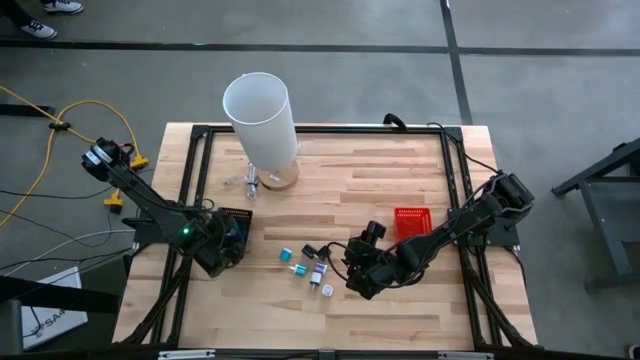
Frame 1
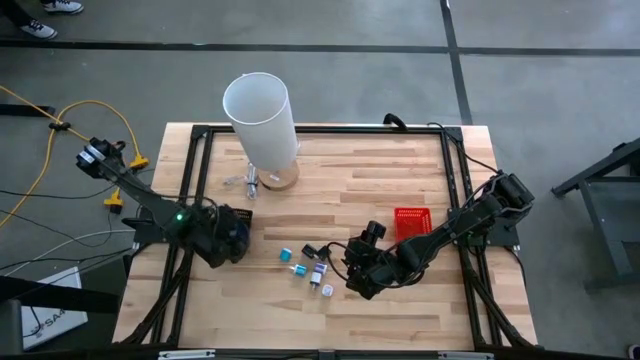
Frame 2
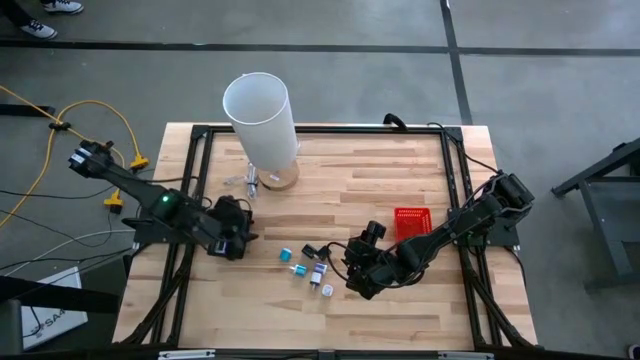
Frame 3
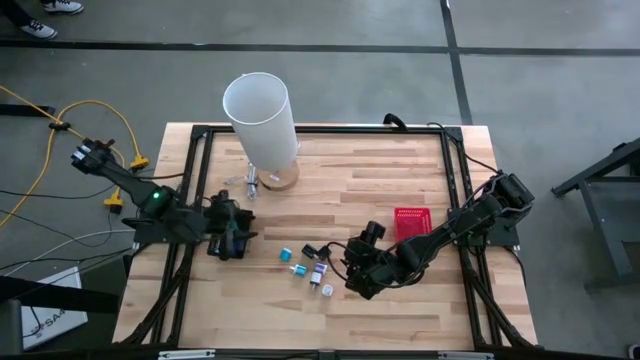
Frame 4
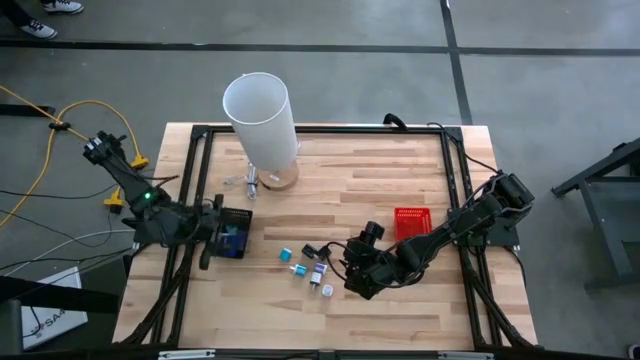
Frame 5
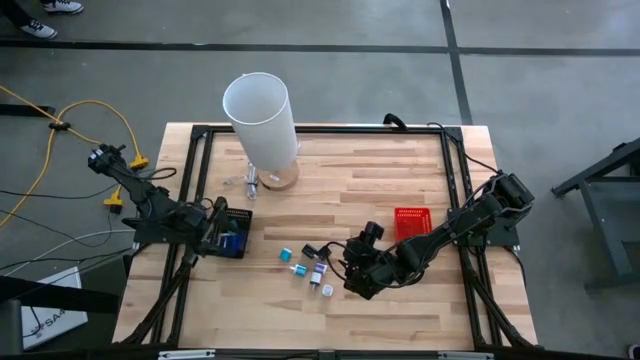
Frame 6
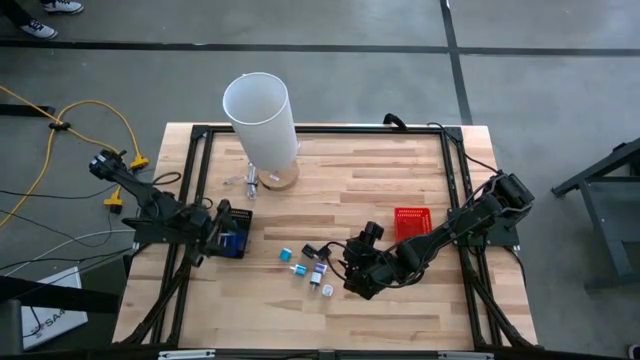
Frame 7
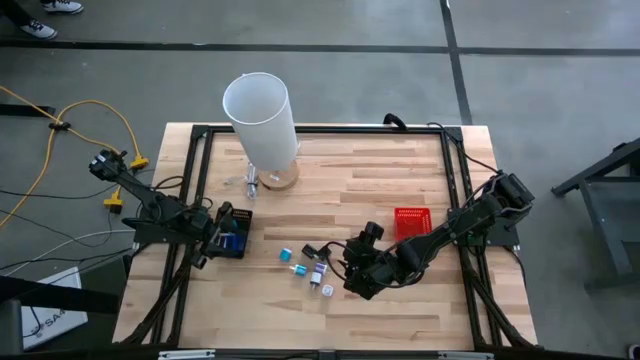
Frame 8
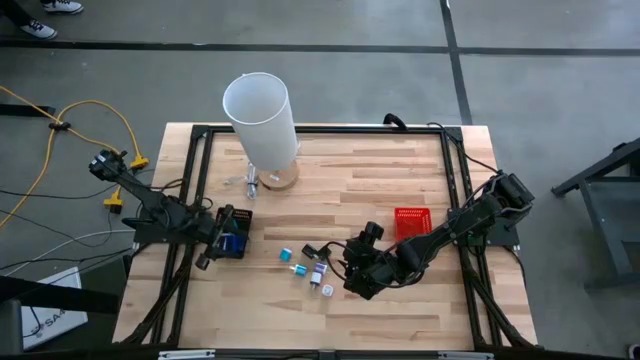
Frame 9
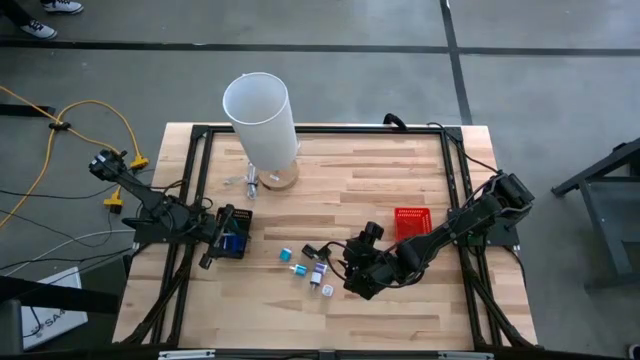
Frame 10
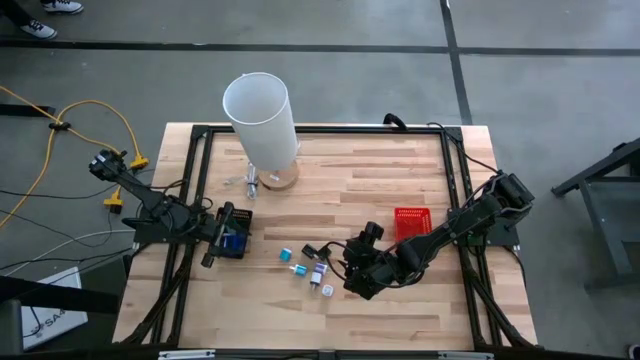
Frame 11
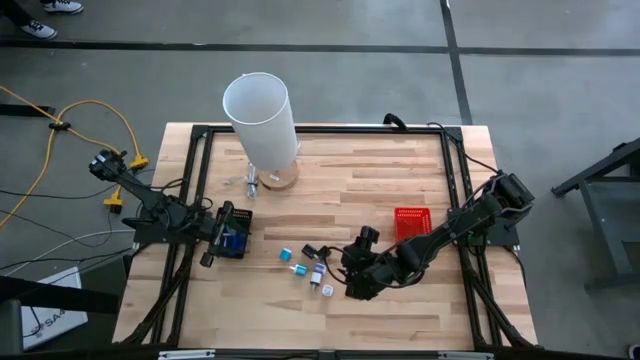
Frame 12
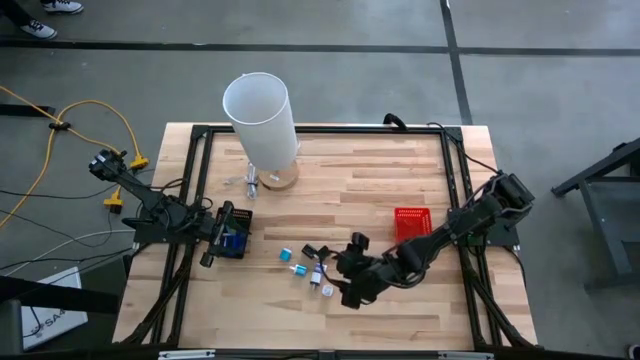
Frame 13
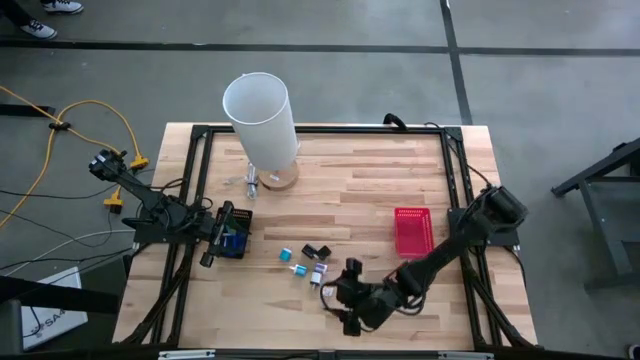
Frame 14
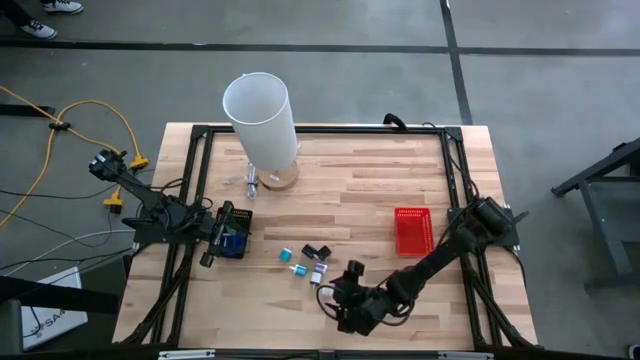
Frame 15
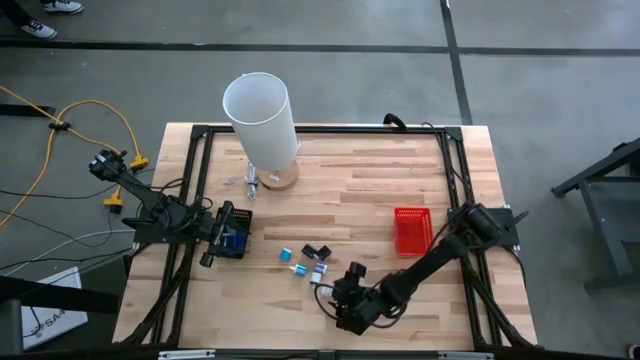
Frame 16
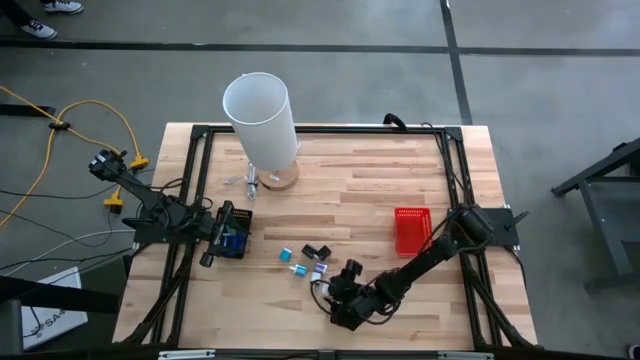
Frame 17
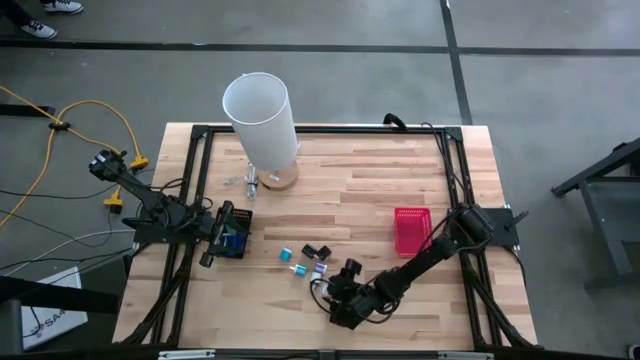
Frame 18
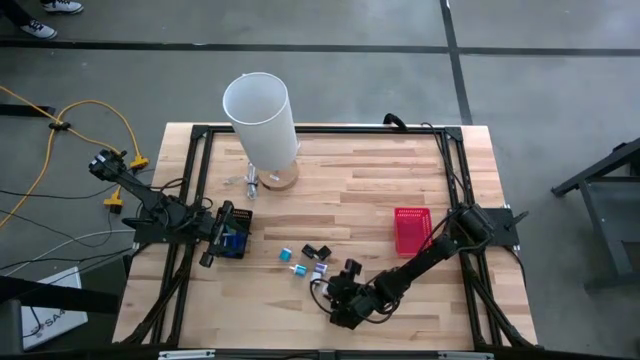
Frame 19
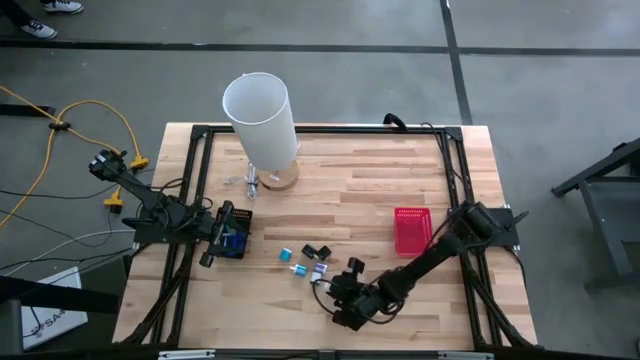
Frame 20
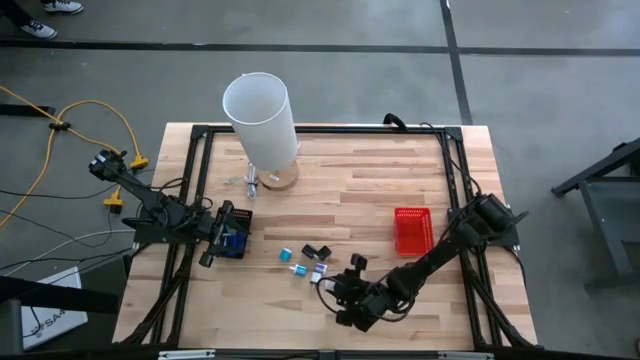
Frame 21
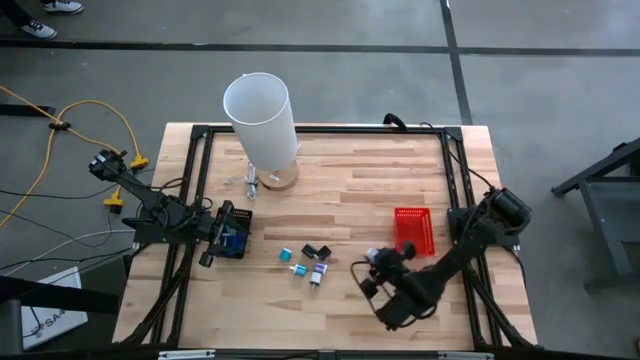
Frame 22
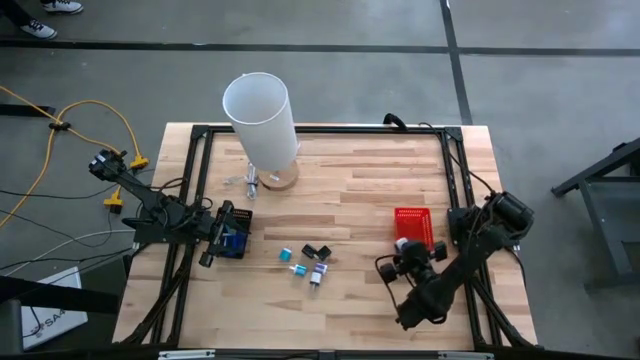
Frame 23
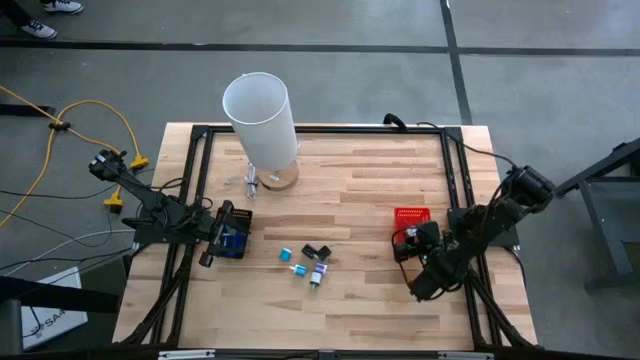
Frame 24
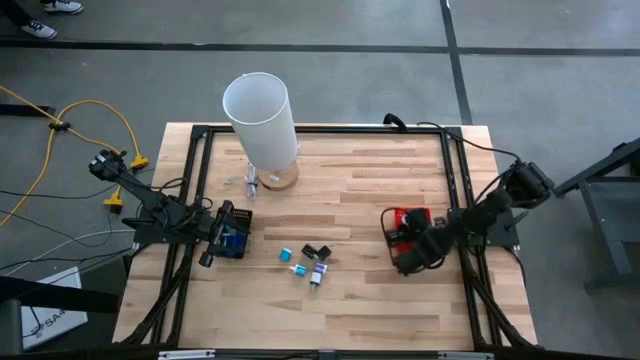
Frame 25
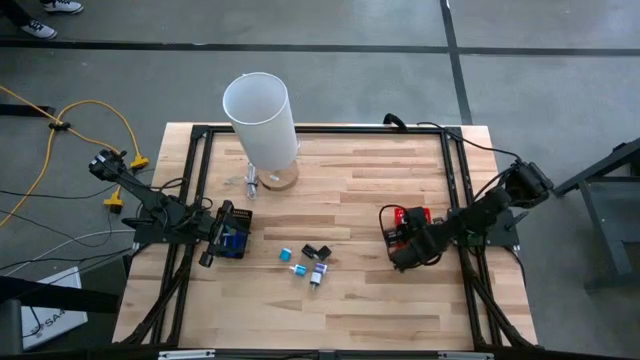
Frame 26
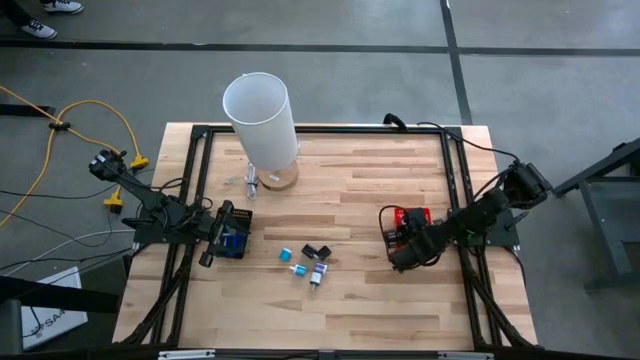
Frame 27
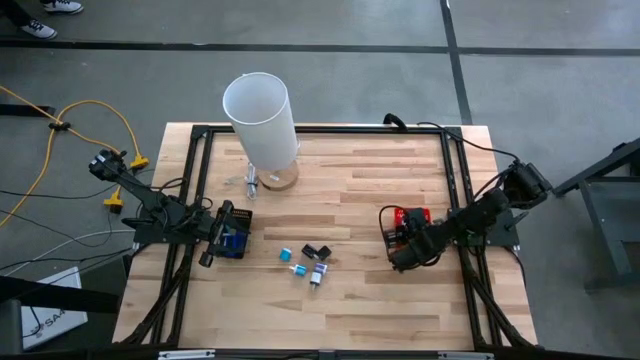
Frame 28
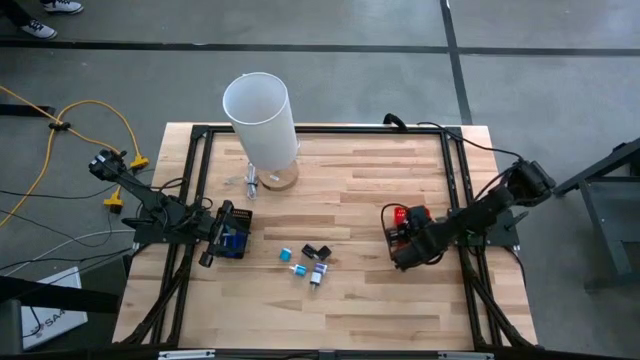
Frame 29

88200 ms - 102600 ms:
Task: Pick & Place Office items
Put the red charger adapter into the red bin

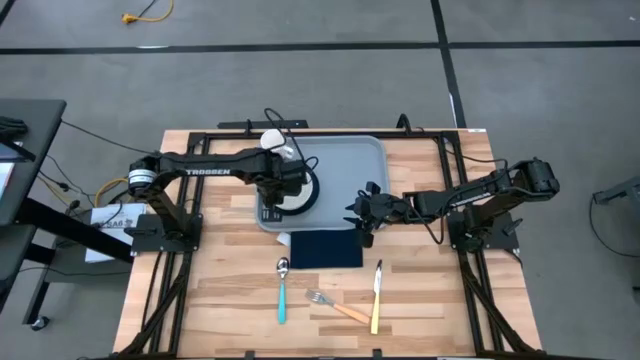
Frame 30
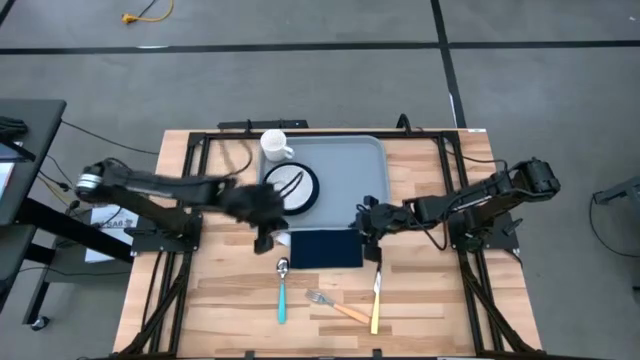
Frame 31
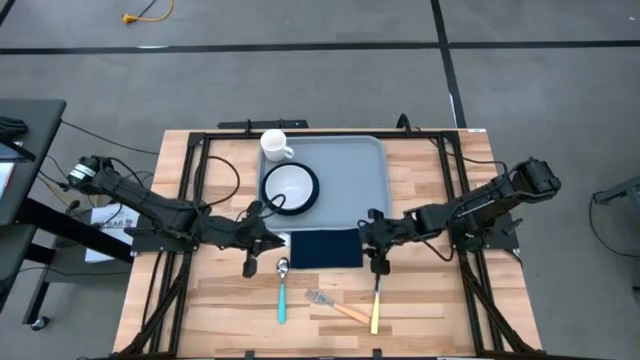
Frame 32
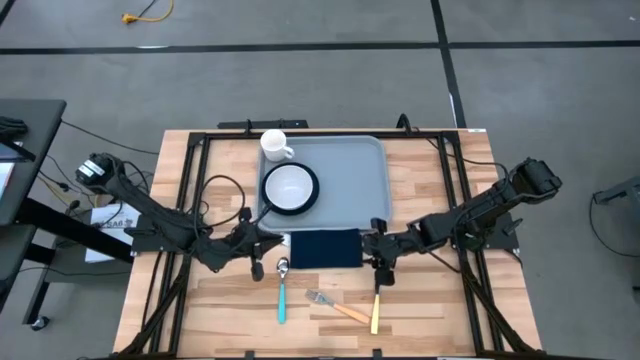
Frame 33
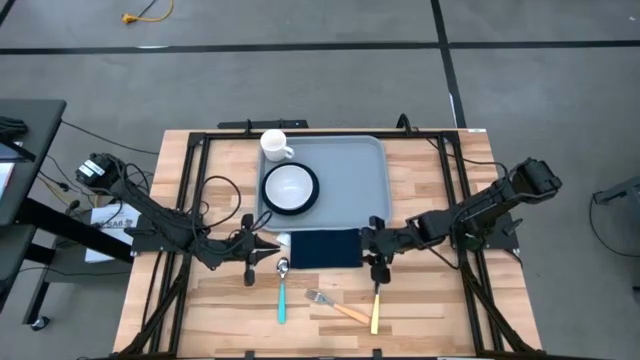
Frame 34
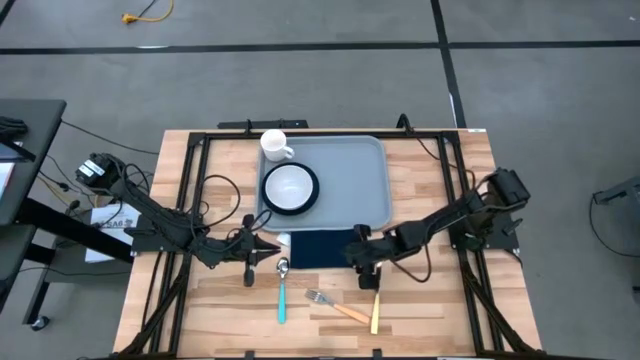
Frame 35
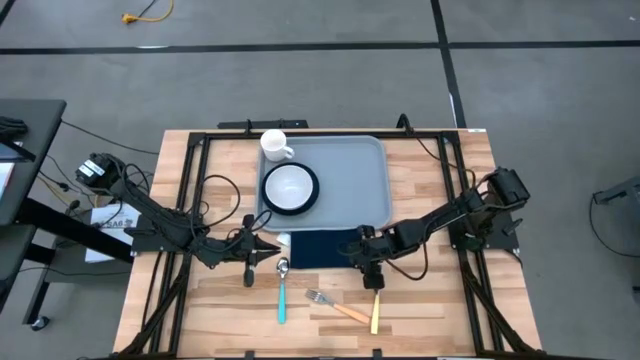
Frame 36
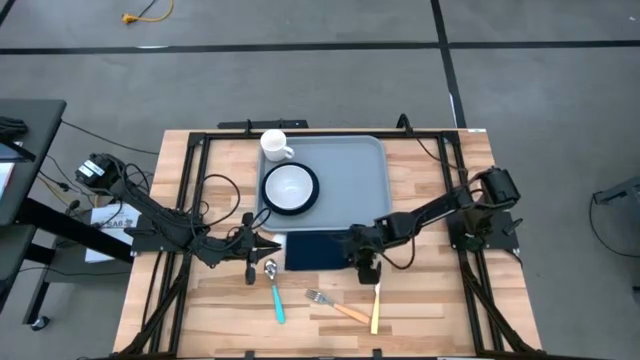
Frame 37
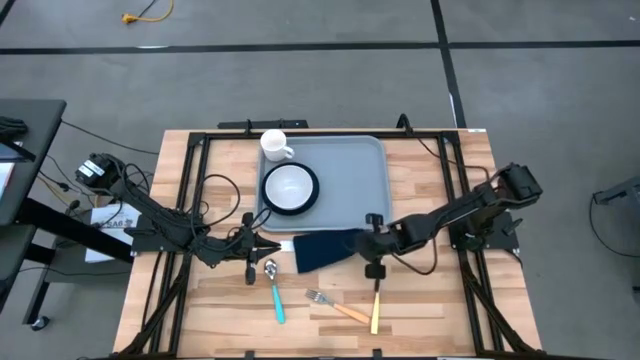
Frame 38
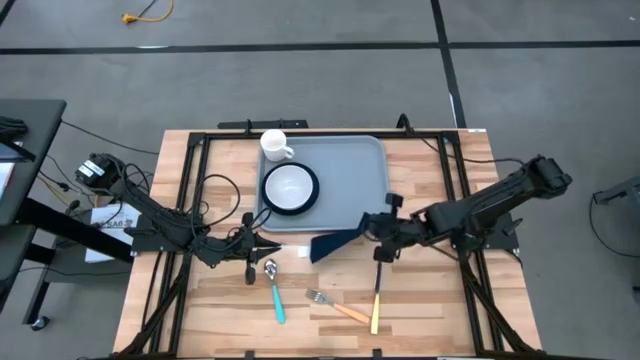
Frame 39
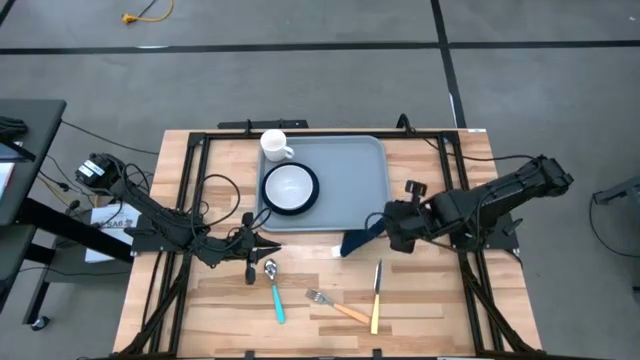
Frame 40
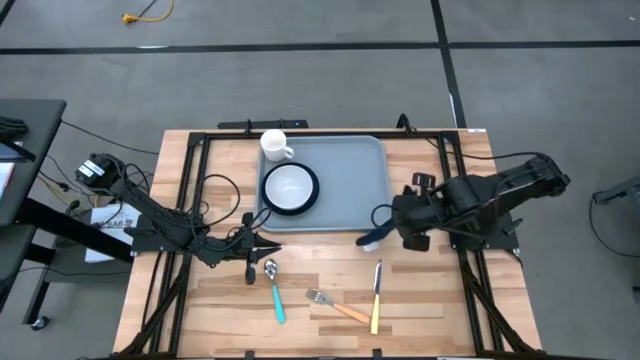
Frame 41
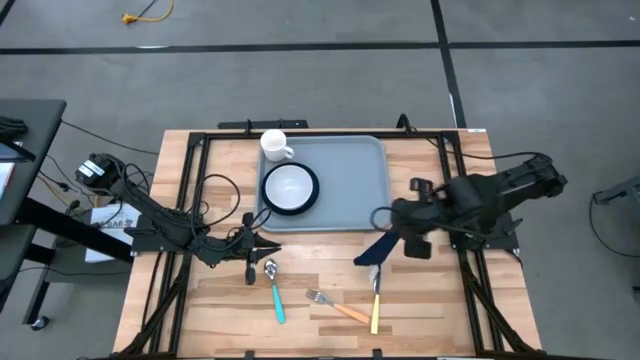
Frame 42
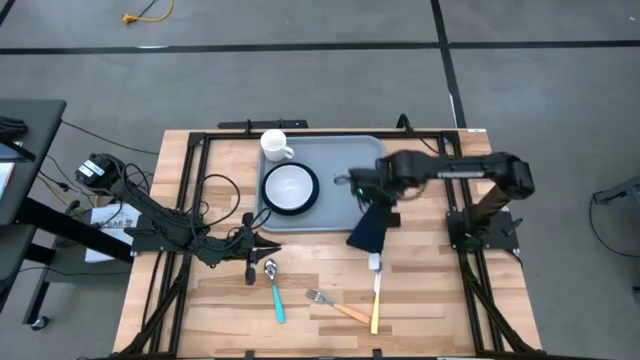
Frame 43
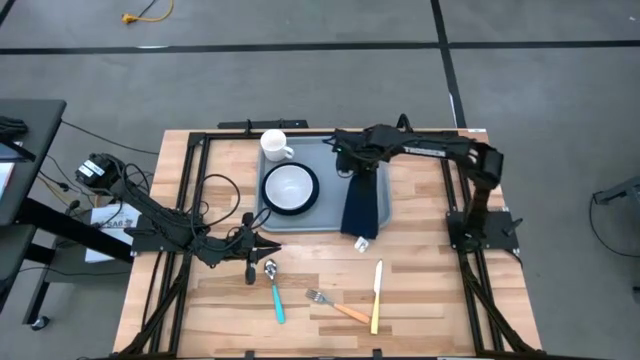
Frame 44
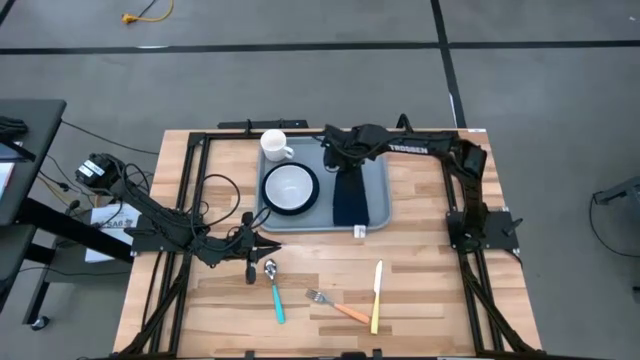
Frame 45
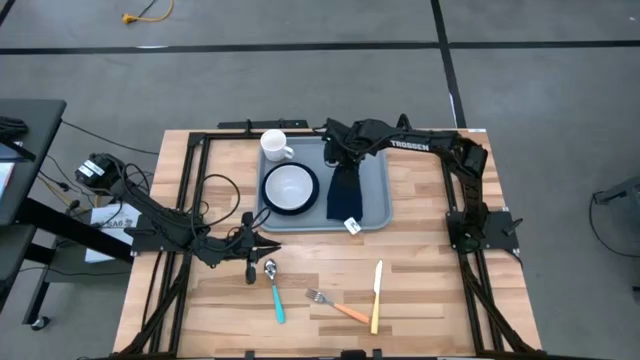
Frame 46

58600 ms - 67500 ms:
Task: Set up tray
Put the dark blue table napkin on the gray serving tray to the right of the black plate
